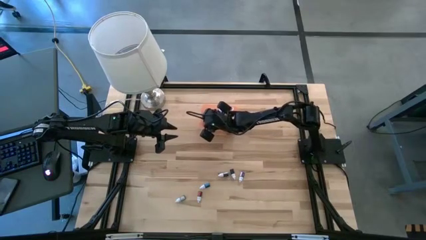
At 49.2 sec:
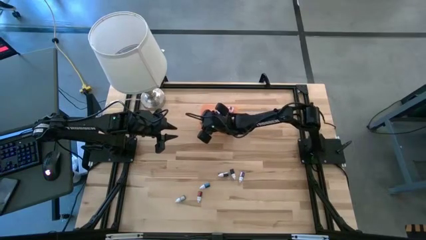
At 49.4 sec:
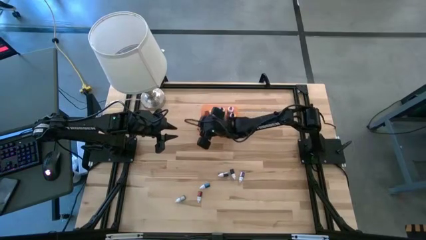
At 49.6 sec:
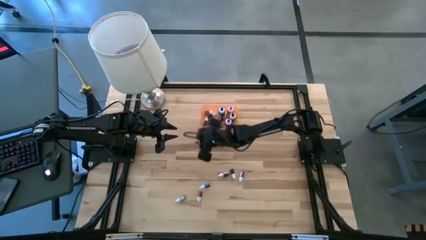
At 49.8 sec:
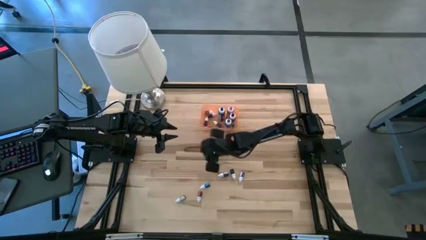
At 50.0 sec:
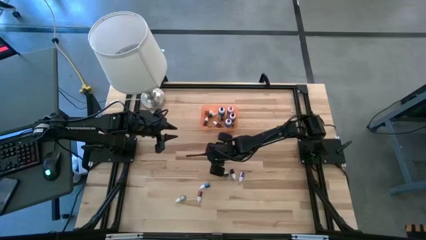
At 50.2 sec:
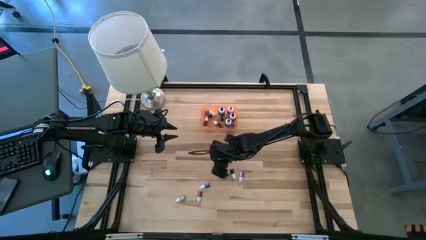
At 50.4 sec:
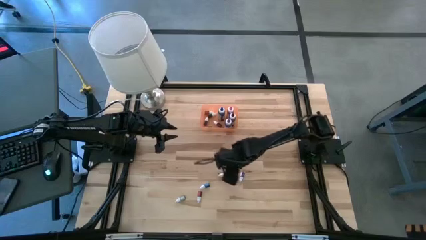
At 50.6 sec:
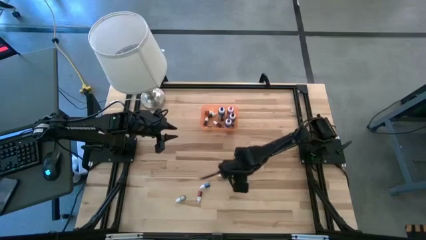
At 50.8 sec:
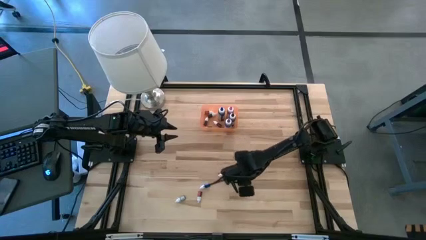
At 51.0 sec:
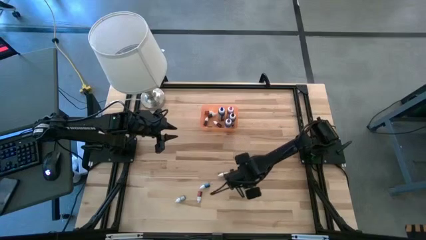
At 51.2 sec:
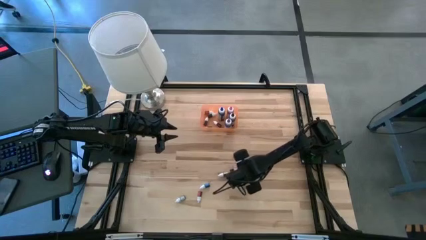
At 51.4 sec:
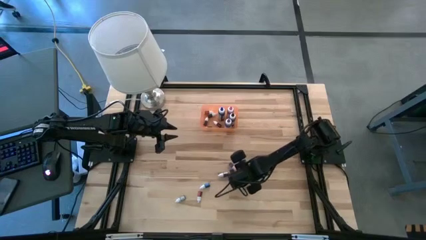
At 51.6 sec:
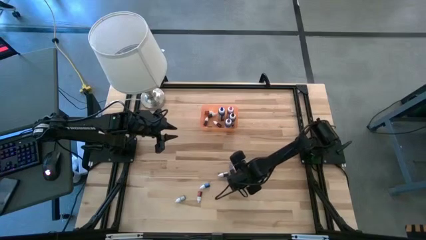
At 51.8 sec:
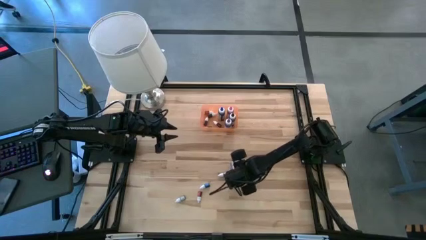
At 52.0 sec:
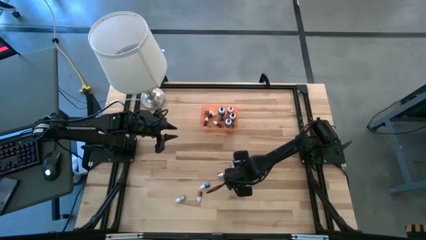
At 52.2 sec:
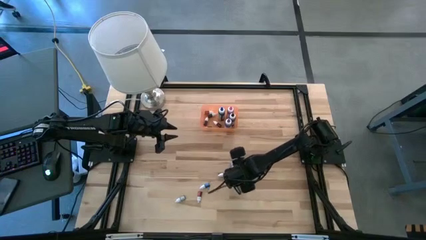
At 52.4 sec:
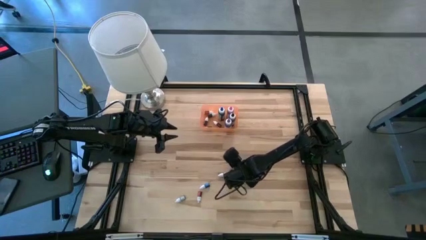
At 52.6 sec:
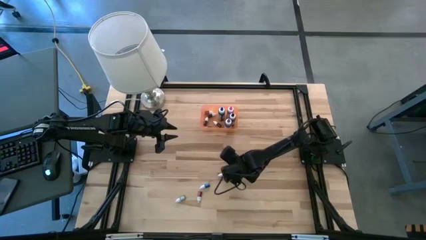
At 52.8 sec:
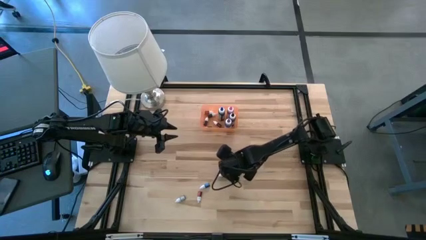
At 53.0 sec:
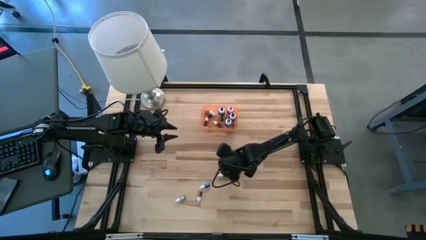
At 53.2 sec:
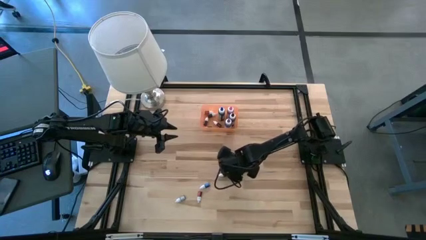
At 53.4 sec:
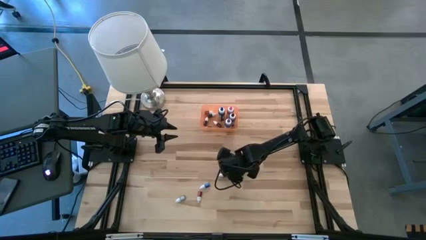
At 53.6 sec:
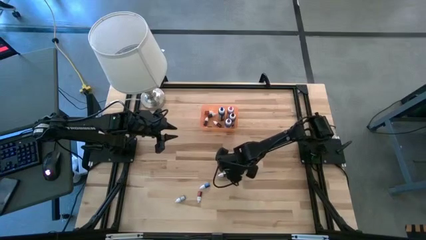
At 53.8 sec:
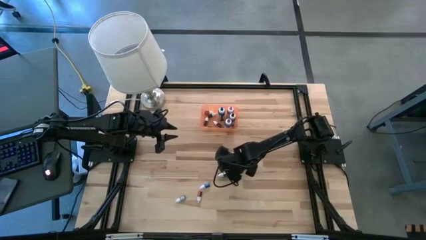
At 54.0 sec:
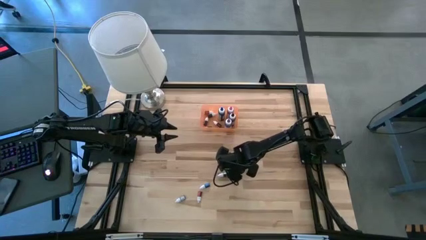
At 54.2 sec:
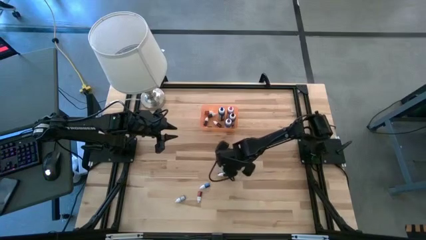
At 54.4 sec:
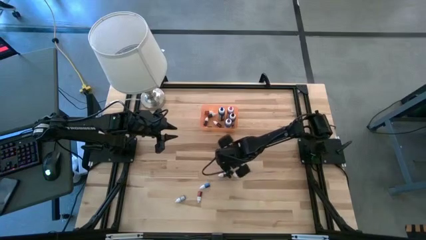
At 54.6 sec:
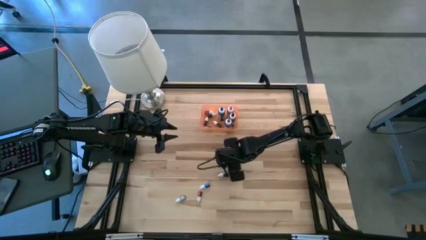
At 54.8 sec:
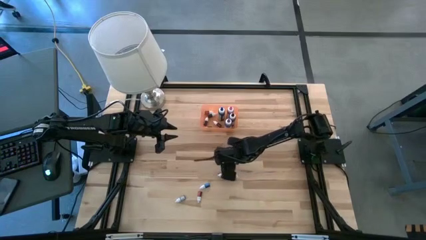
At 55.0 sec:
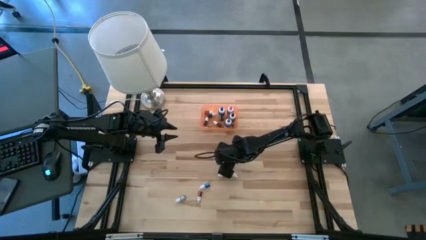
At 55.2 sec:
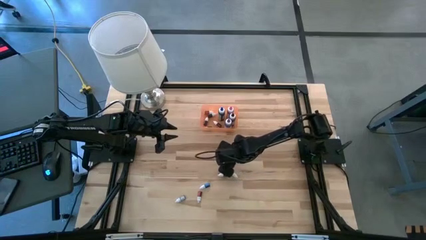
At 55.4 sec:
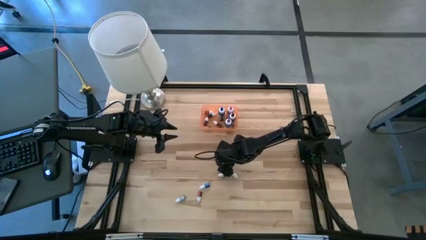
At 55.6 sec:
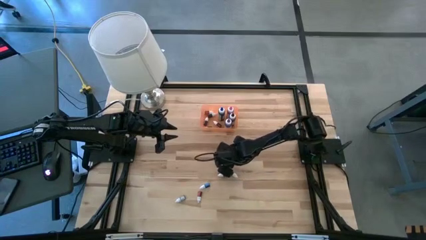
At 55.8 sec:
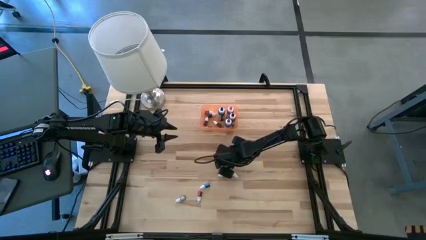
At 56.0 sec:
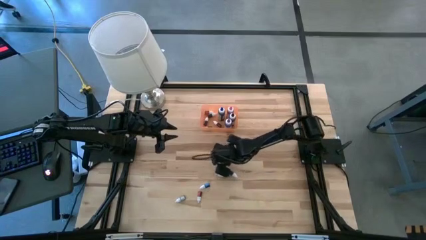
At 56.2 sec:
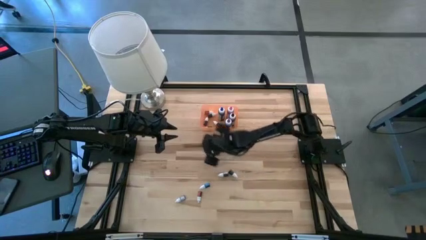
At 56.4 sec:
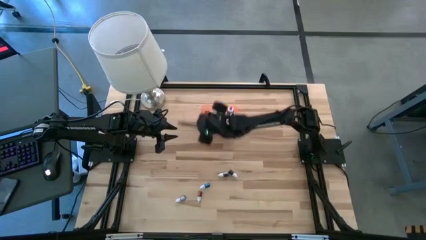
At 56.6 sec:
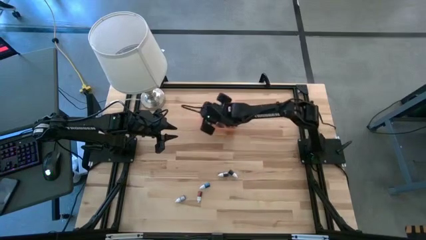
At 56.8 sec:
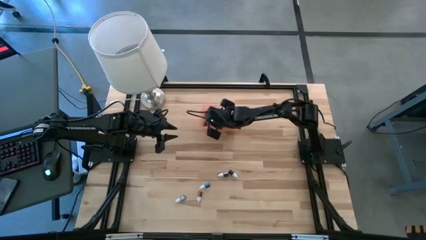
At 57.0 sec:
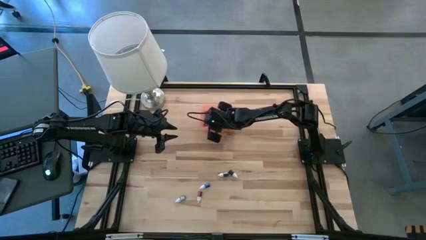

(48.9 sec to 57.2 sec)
Task: Pick & Place food coloring
Put the small purple food coloring bottle into the bin

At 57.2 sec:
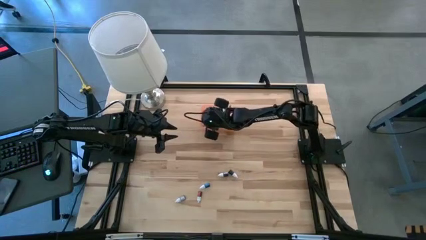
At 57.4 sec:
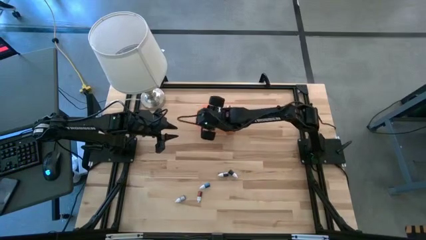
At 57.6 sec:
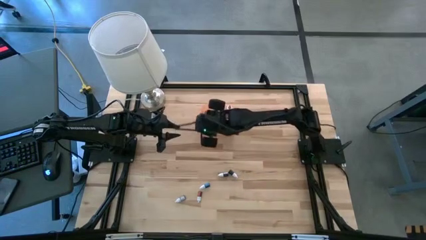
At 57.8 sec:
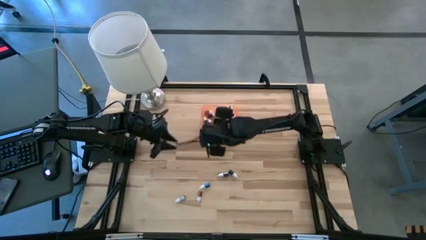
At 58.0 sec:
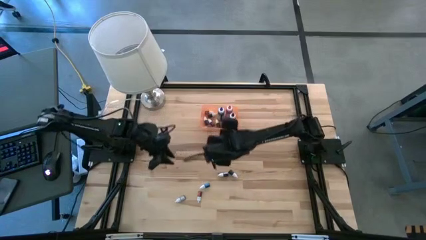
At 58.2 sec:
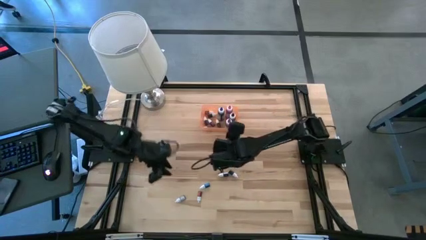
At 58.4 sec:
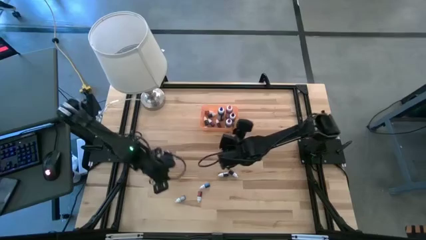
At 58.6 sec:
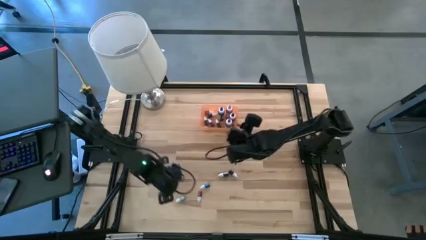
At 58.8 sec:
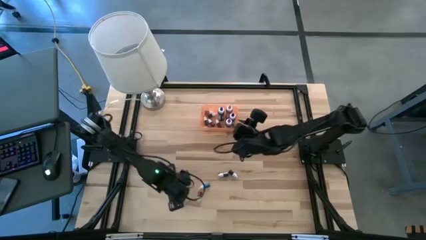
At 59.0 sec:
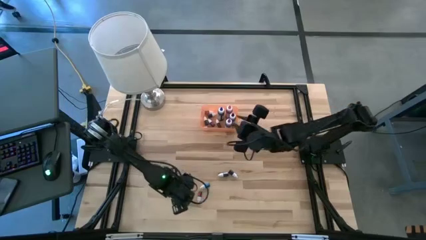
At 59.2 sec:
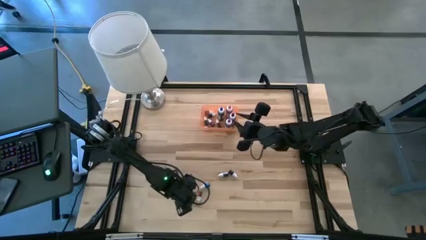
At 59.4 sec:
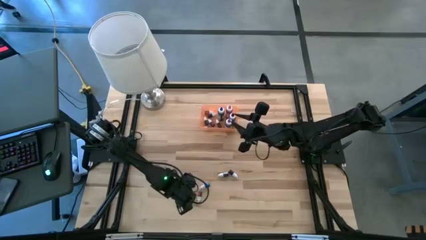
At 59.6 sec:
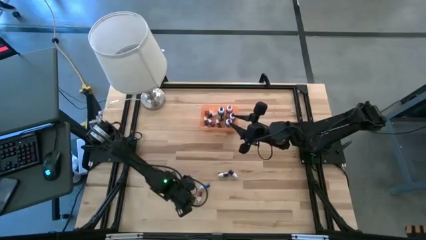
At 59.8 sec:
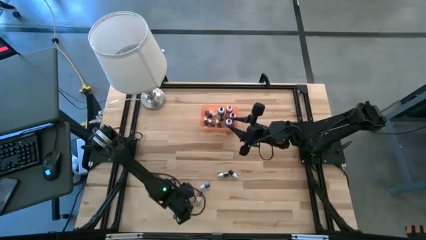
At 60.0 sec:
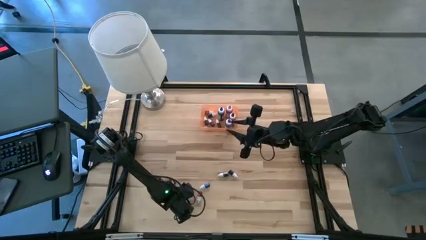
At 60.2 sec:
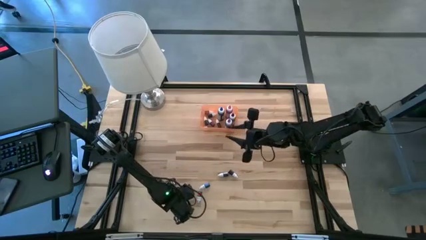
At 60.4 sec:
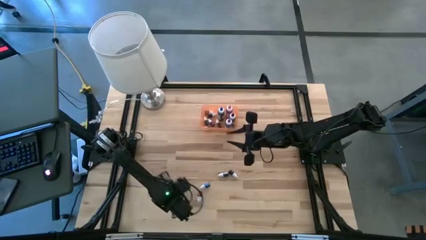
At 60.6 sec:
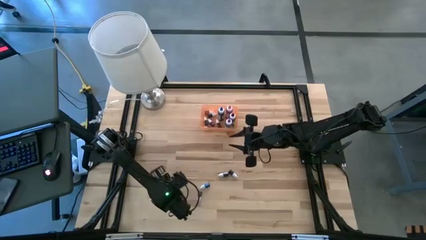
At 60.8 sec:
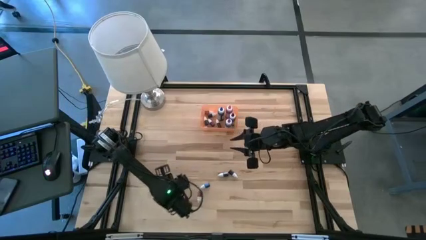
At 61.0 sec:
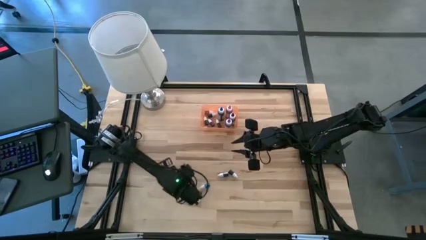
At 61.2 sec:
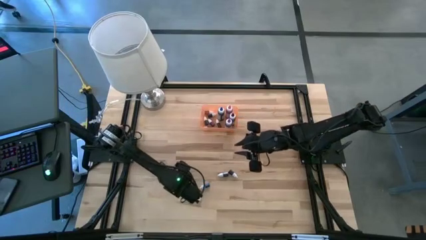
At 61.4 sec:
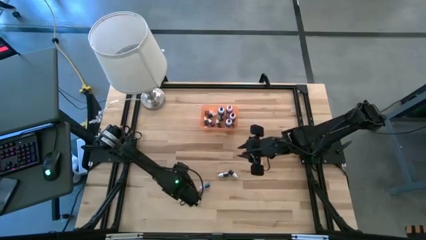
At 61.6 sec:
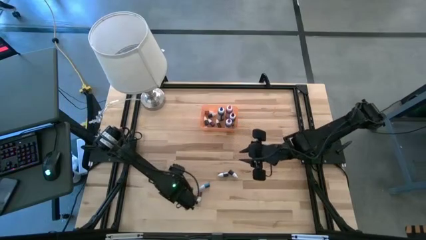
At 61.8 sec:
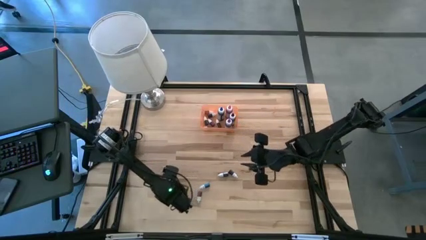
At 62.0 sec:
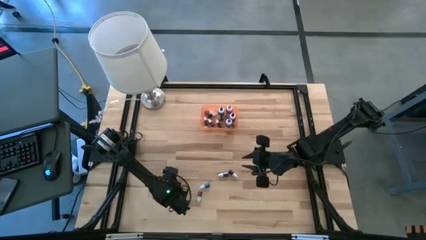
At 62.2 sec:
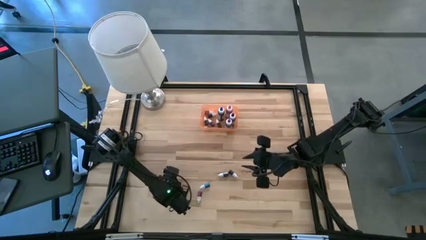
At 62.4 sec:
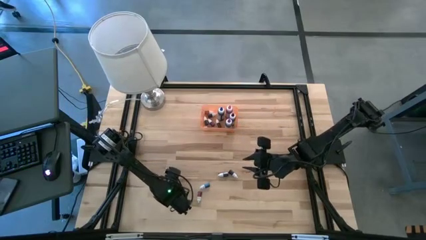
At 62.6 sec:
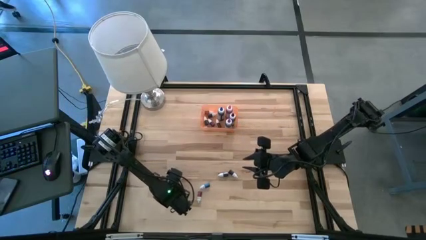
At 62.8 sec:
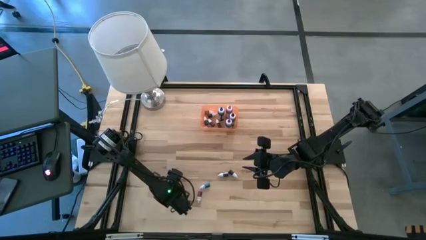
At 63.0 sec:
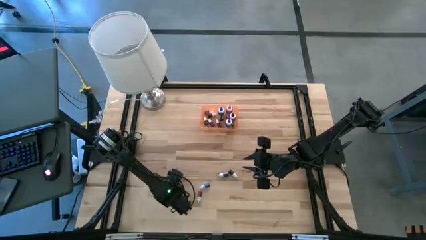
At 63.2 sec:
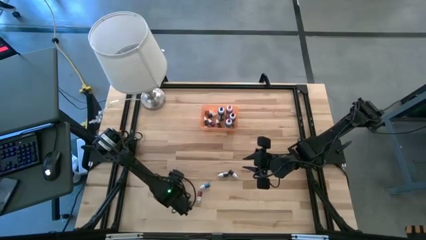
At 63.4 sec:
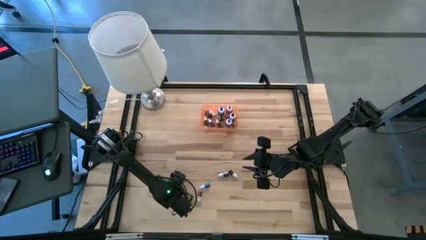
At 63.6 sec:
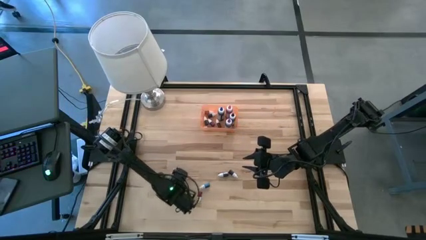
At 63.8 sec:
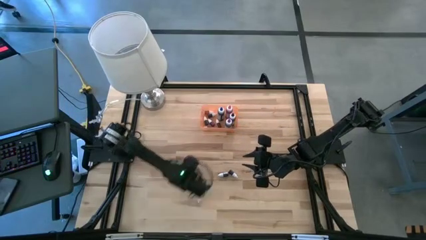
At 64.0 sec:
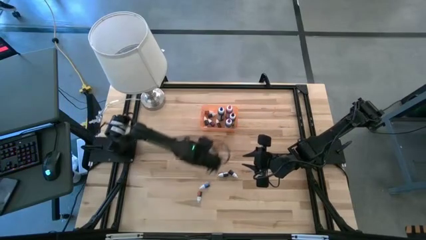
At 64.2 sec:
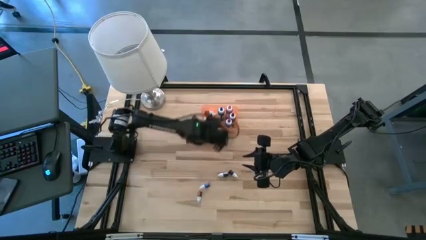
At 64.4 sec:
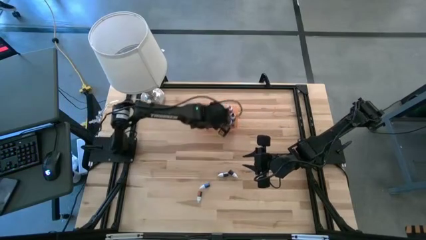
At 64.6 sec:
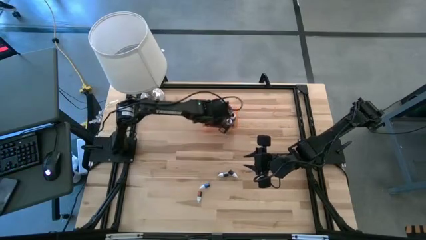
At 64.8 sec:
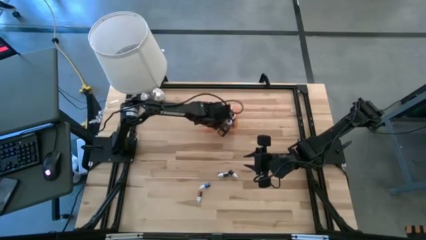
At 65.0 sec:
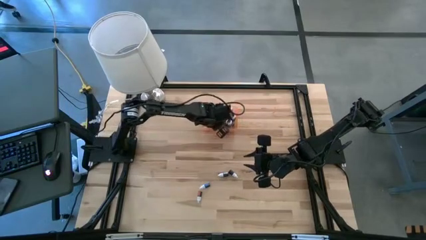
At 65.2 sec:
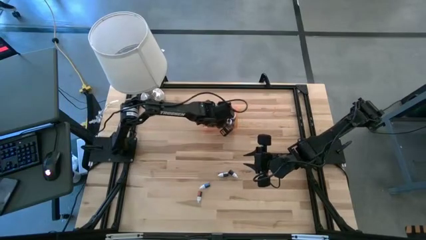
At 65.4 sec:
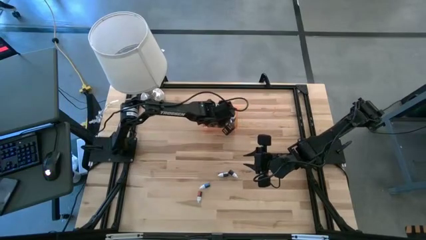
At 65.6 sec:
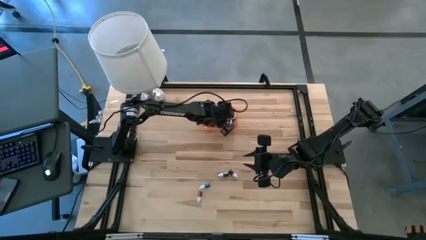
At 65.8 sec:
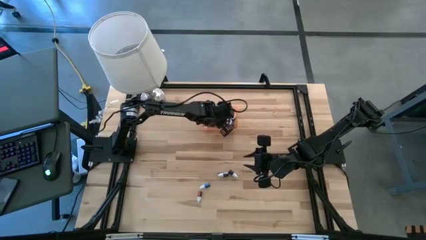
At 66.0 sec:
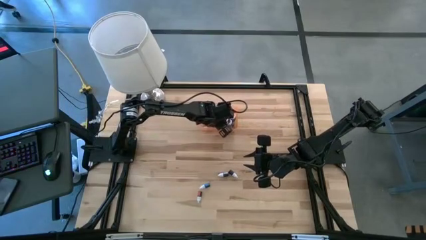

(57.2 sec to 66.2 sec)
Put the small green food coloring bottle into the bin
